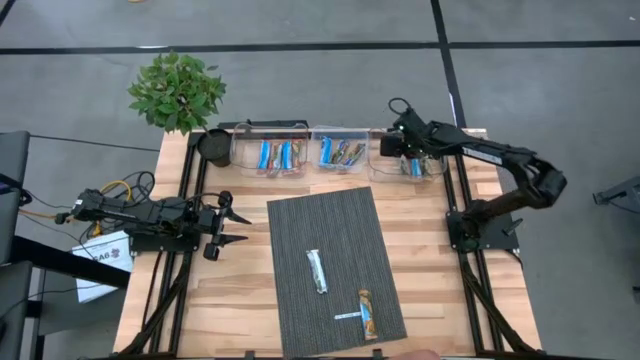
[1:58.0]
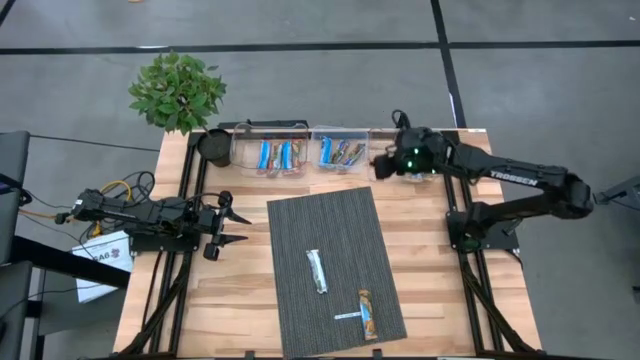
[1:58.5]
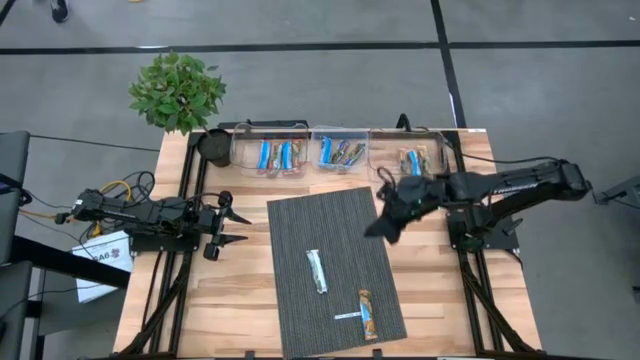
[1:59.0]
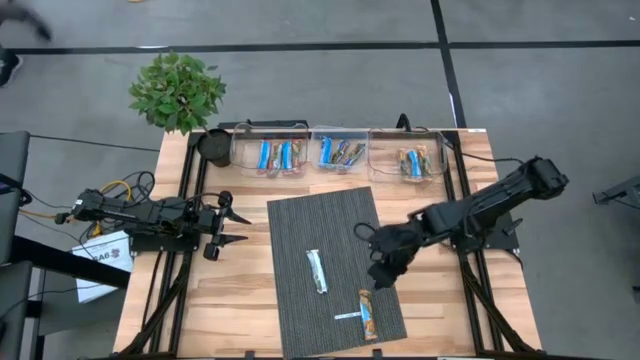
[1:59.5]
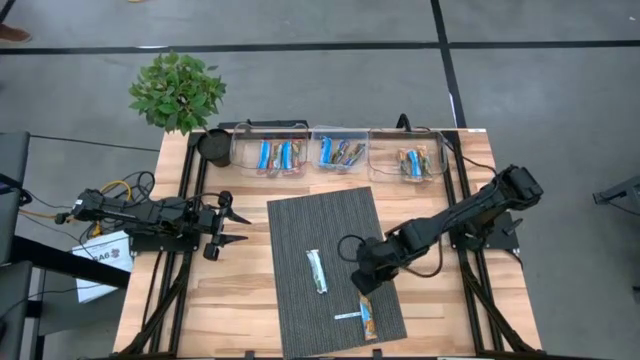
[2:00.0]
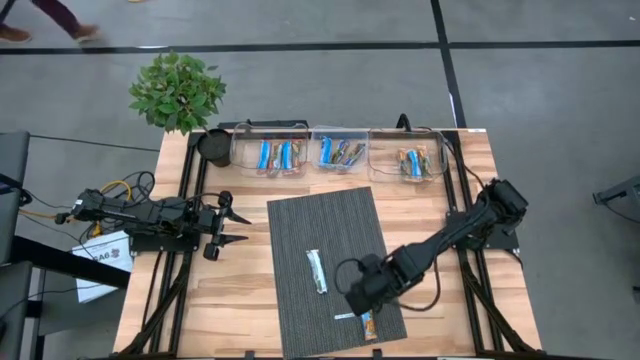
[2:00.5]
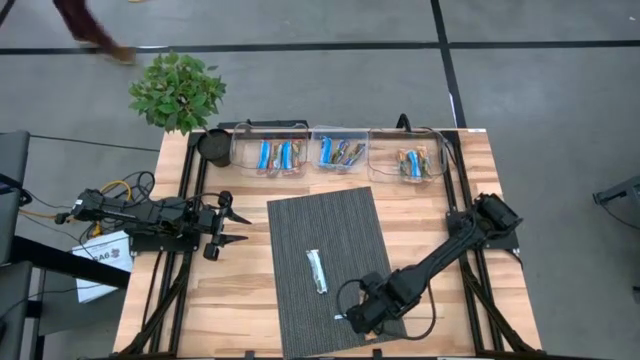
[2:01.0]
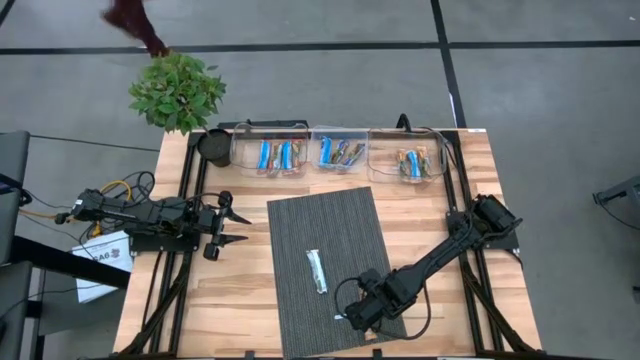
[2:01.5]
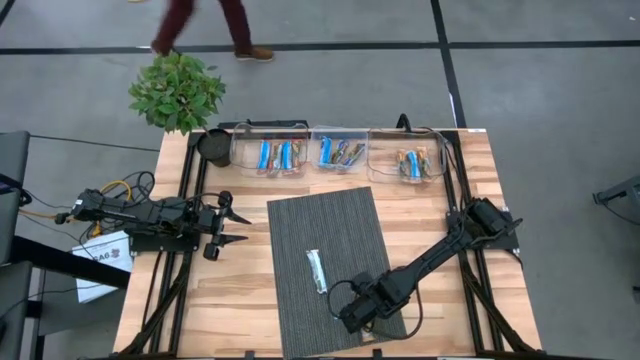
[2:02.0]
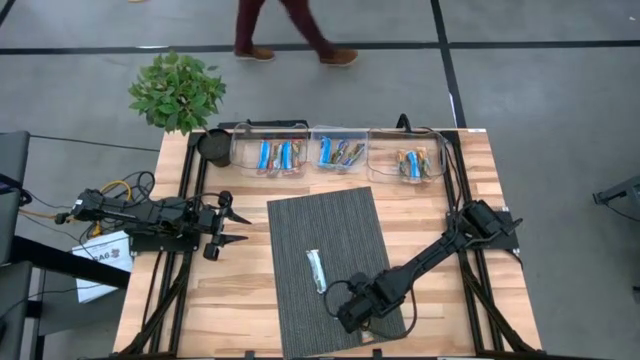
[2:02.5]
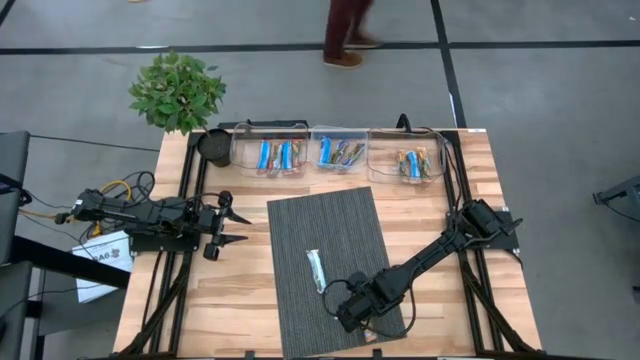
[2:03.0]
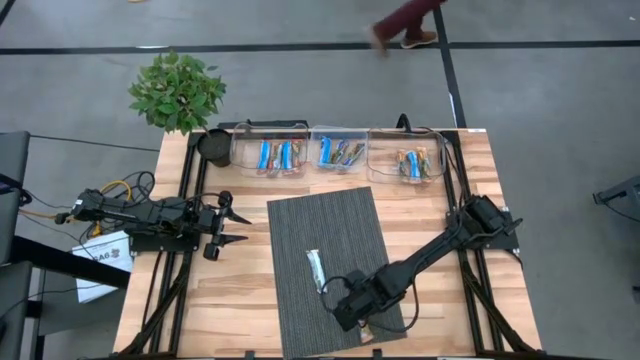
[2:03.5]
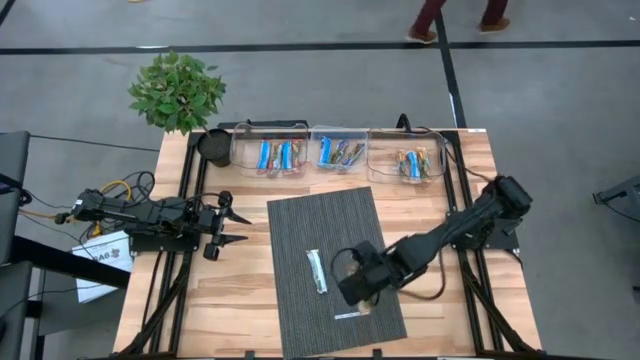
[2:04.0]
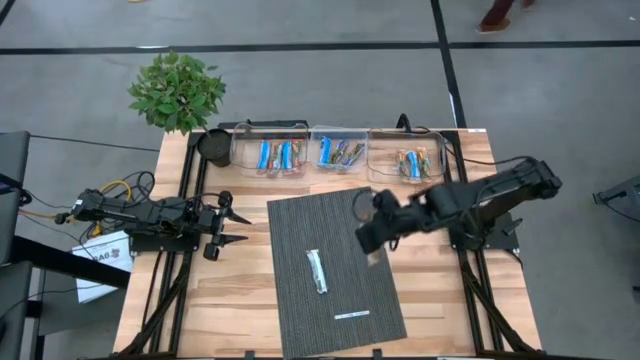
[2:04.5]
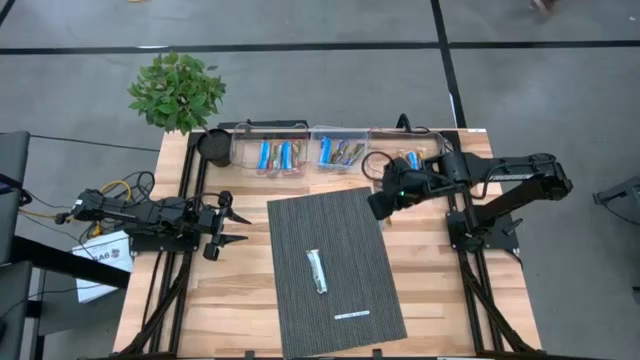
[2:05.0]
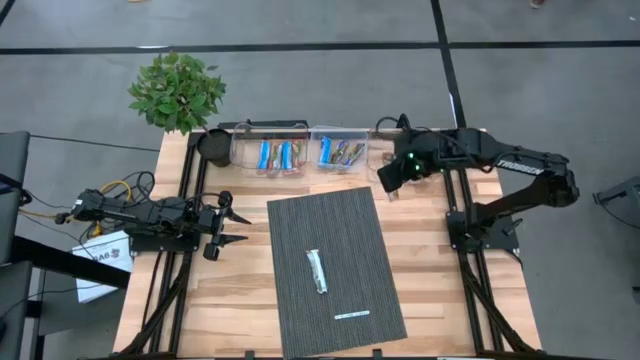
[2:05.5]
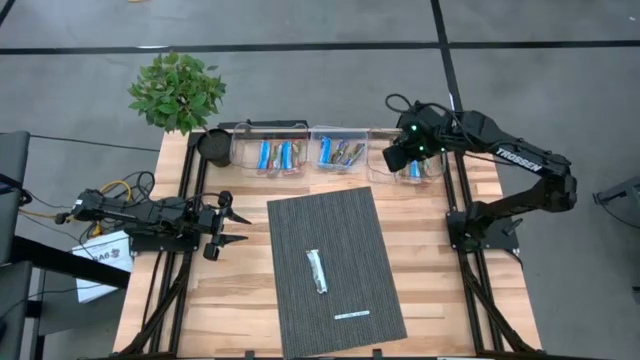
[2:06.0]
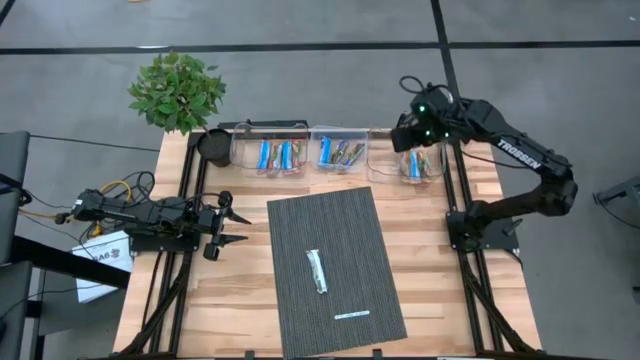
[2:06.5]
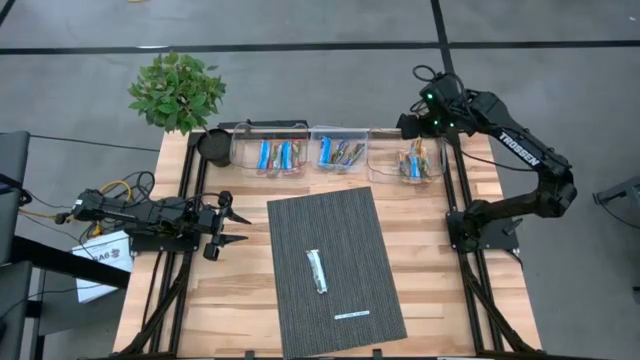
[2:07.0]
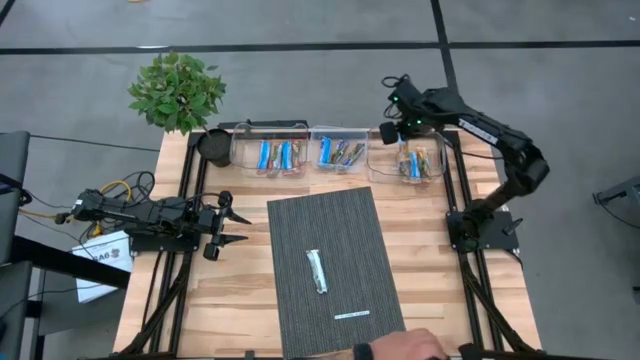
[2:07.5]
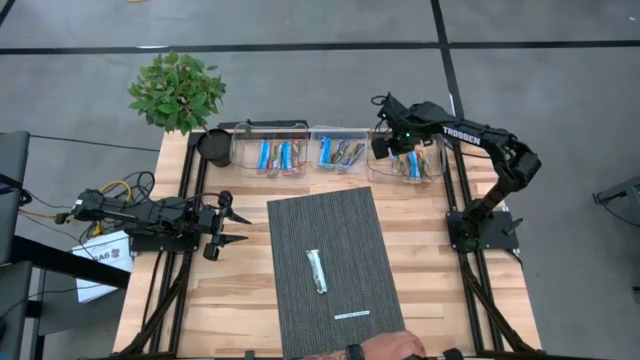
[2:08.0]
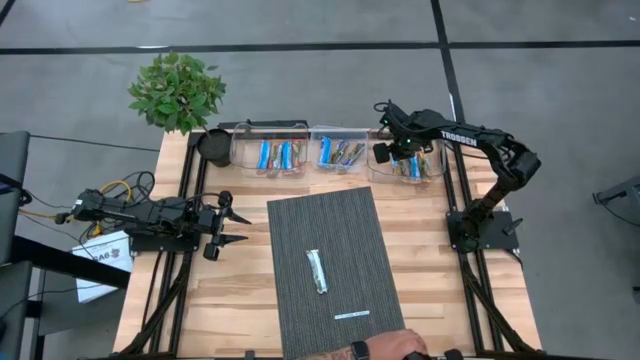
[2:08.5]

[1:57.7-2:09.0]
Task: Pick and place Granola Bars by type
Put the orange granola bar into the right transparent bin

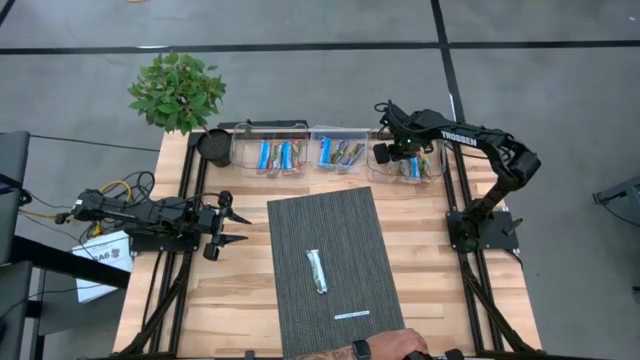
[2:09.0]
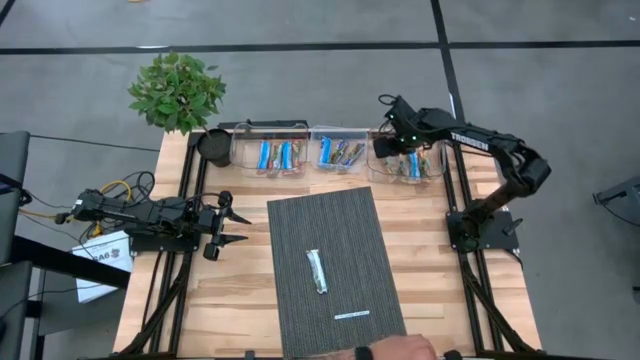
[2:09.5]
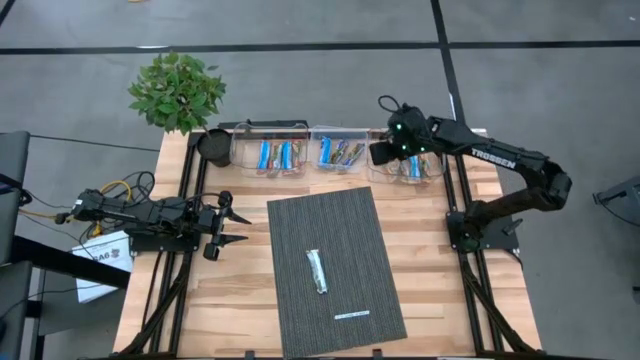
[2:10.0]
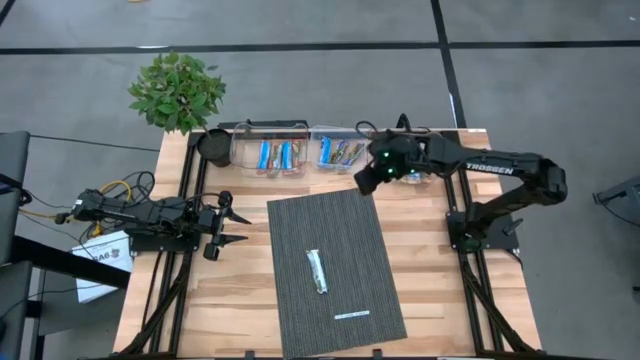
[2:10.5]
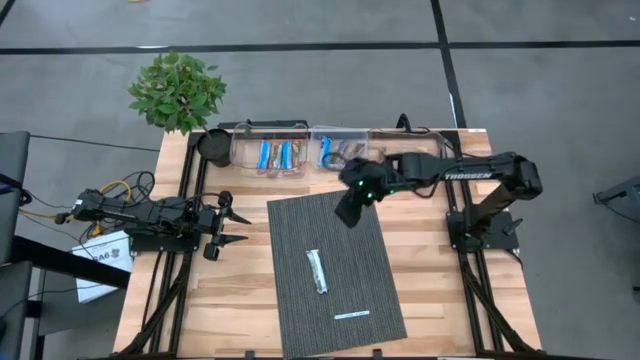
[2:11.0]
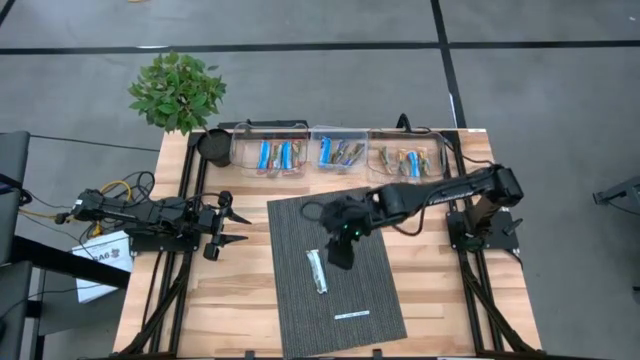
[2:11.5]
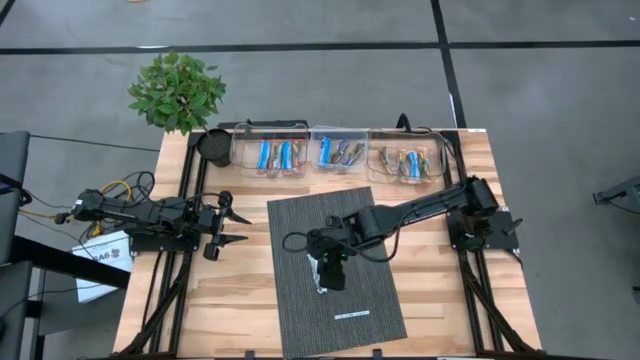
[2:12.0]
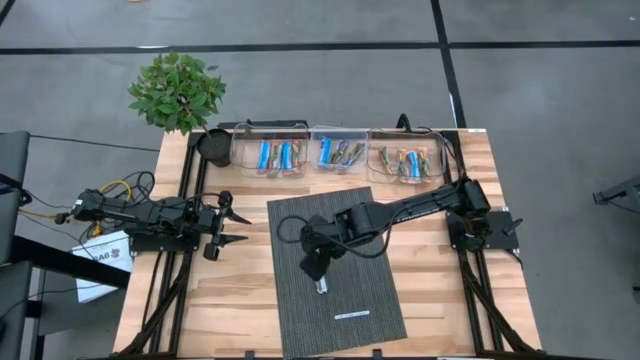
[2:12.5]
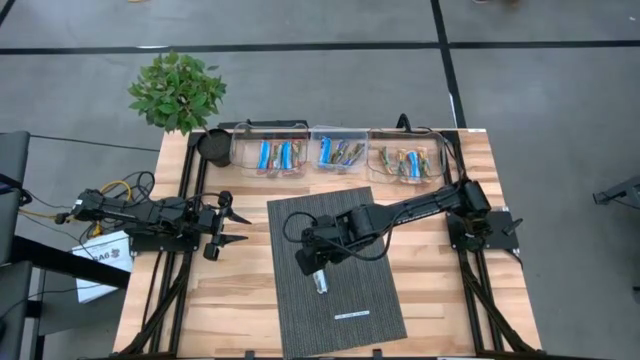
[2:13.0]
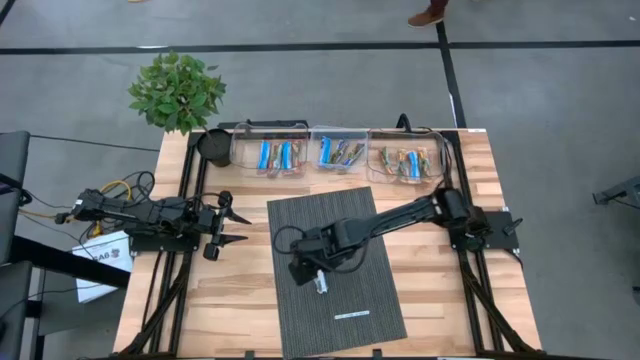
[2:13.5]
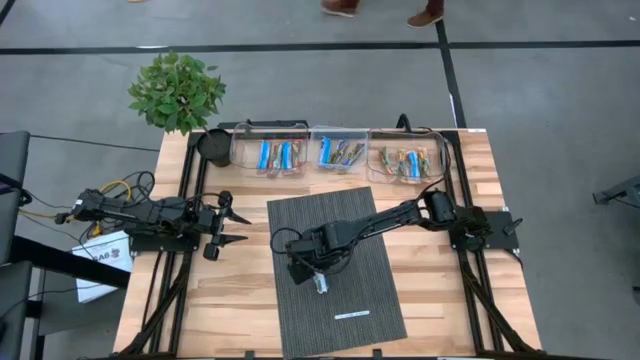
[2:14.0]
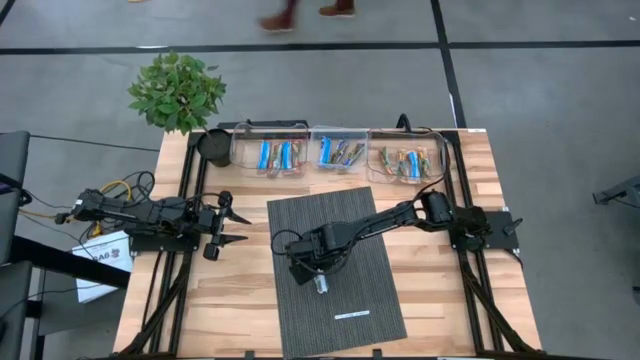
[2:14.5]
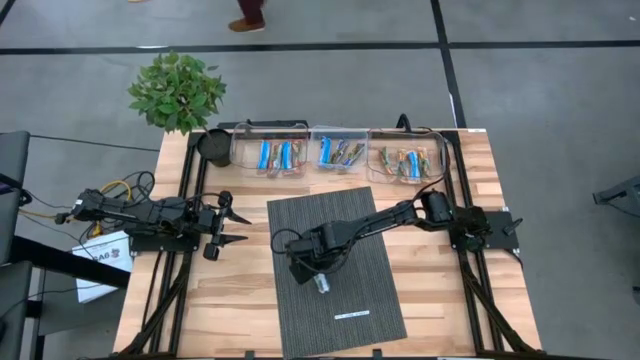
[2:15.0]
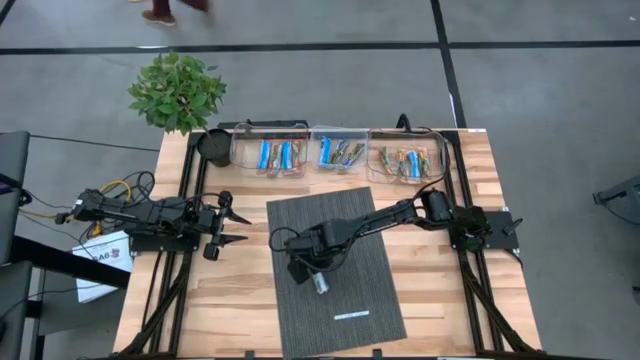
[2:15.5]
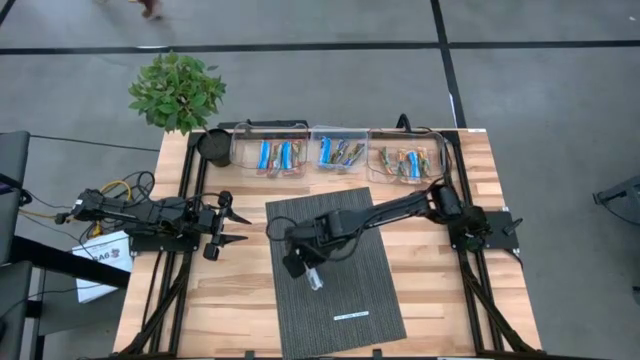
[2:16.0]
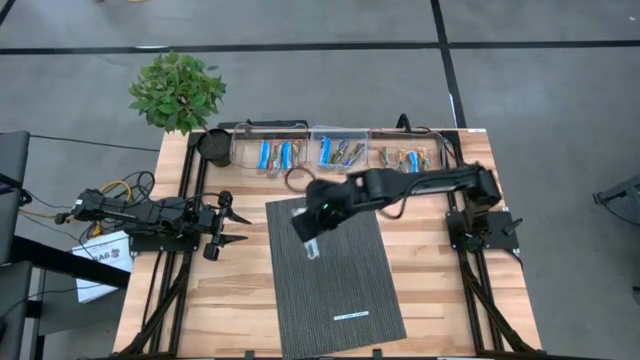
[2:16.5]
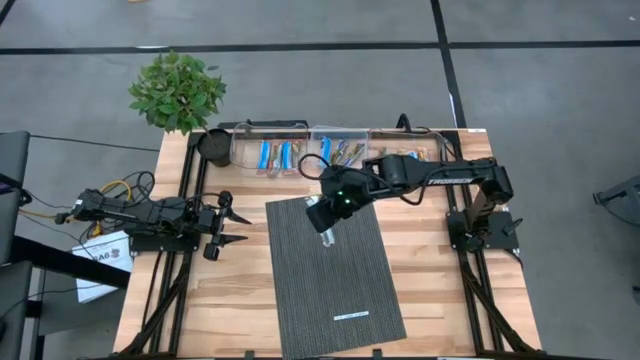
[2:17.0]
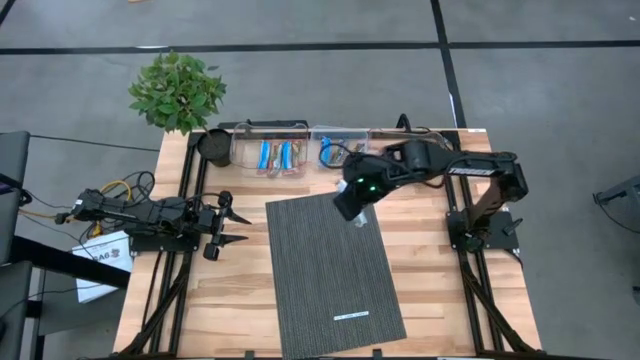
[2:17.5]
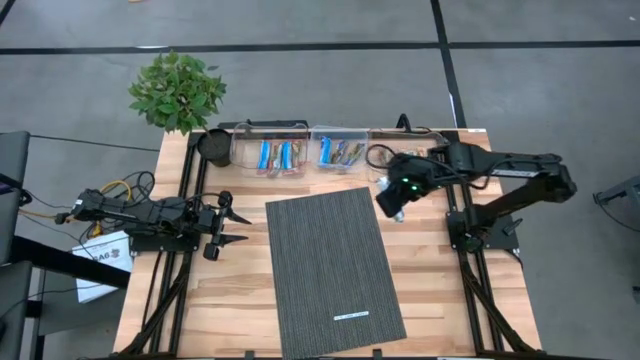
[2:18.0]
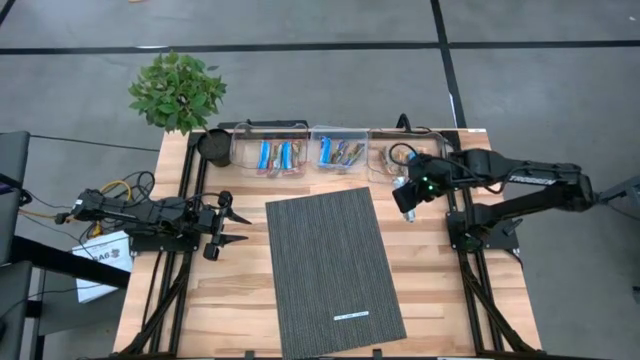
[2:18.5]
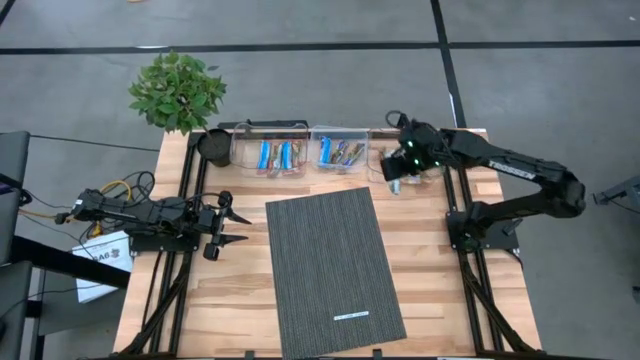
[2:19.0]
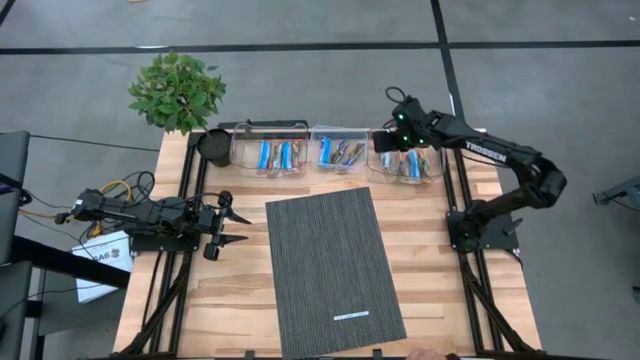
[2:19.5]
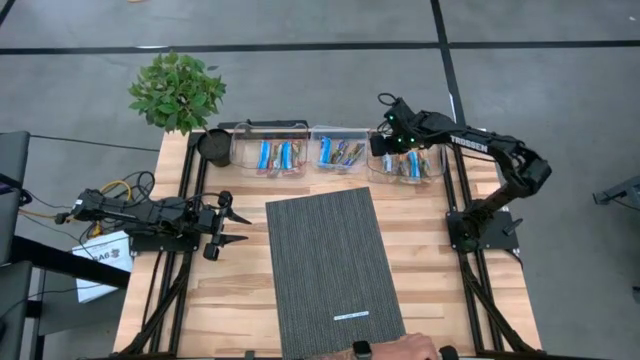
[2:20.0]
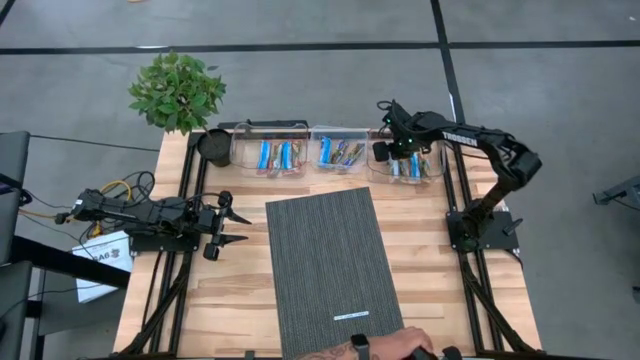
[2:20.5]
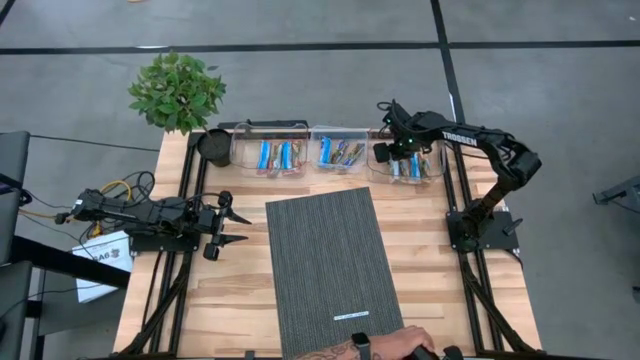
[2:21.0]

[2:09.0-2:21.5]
Put the orange granola bar into the right transparent bin
